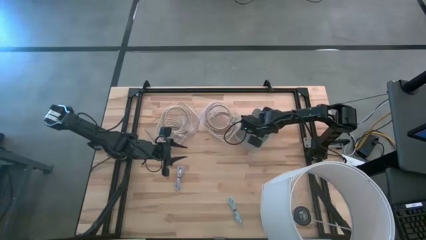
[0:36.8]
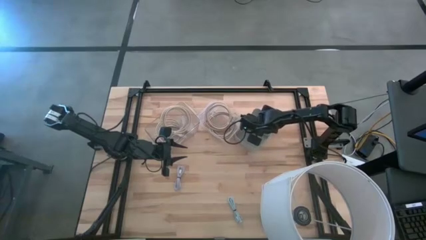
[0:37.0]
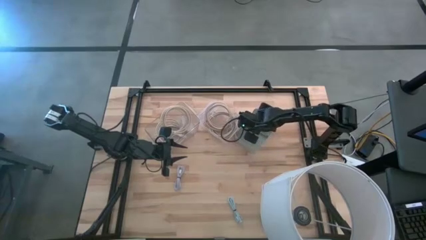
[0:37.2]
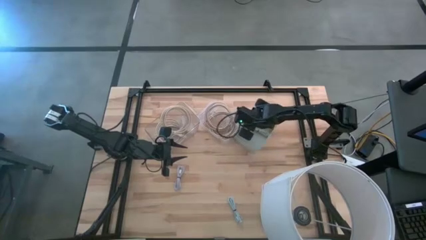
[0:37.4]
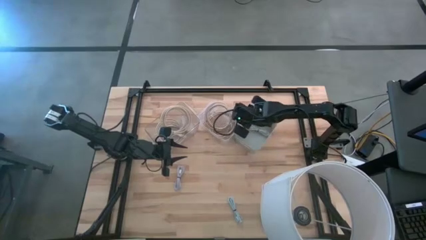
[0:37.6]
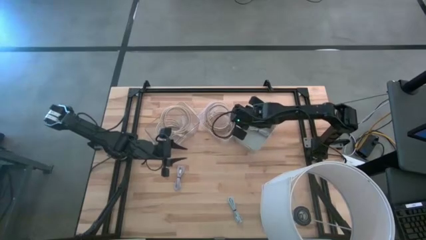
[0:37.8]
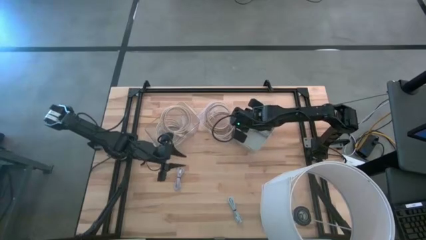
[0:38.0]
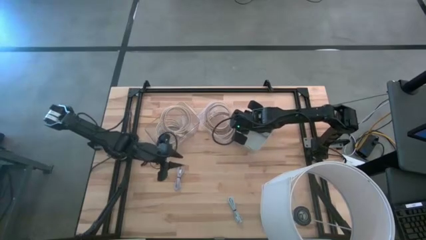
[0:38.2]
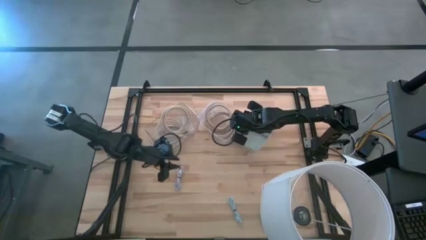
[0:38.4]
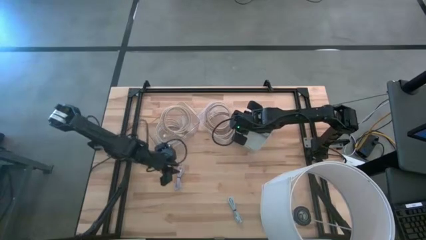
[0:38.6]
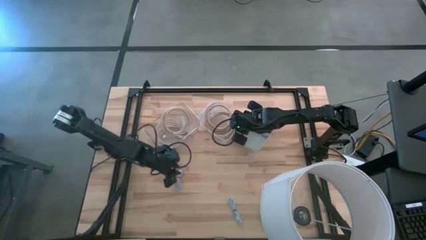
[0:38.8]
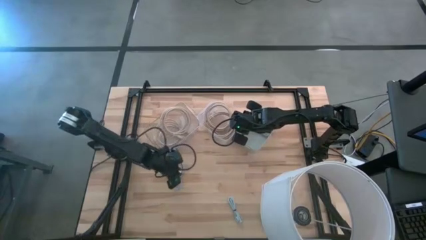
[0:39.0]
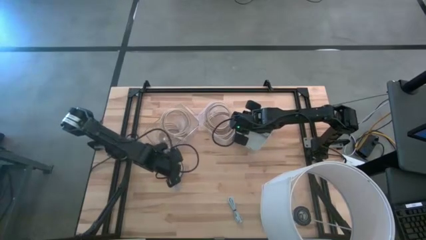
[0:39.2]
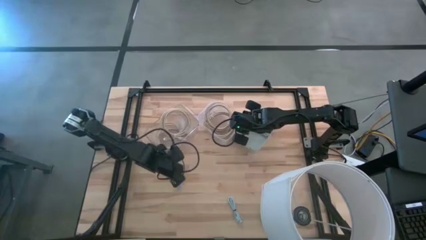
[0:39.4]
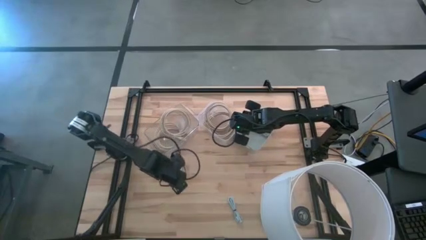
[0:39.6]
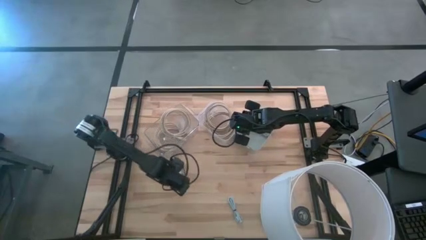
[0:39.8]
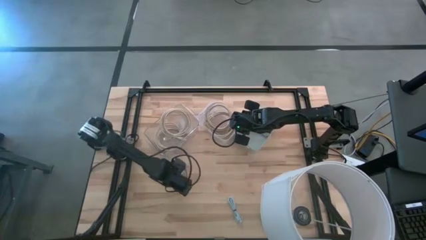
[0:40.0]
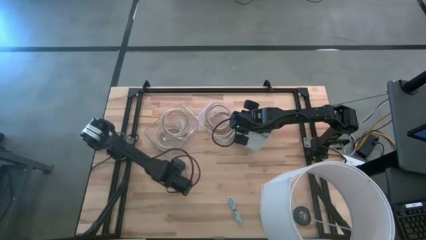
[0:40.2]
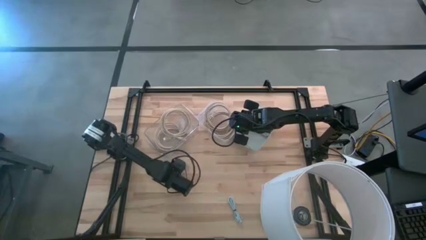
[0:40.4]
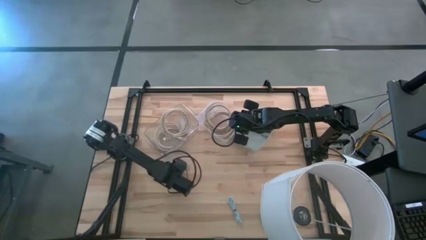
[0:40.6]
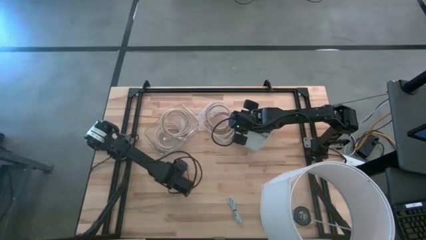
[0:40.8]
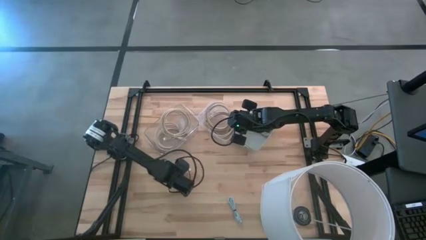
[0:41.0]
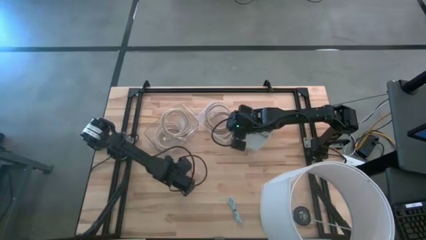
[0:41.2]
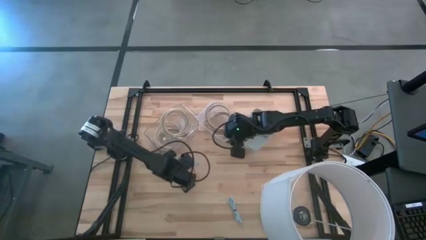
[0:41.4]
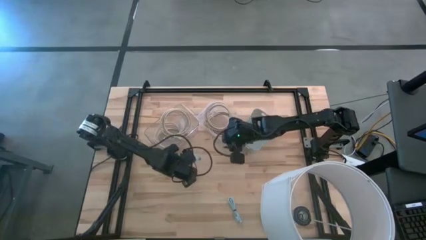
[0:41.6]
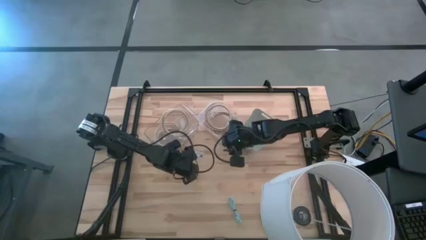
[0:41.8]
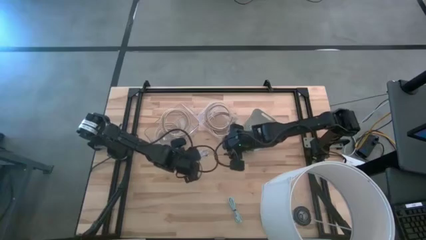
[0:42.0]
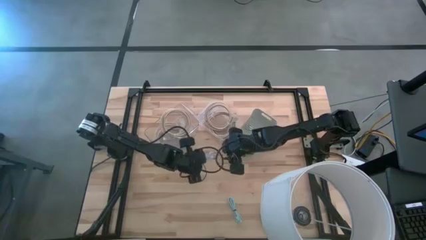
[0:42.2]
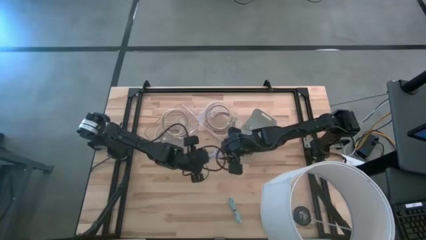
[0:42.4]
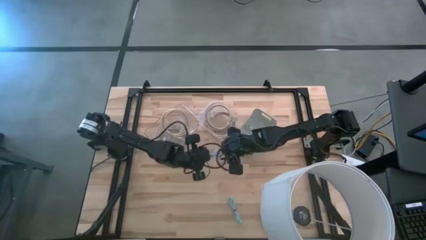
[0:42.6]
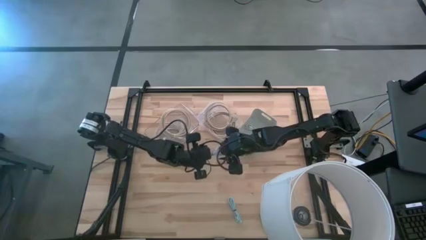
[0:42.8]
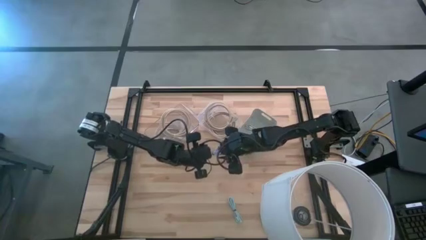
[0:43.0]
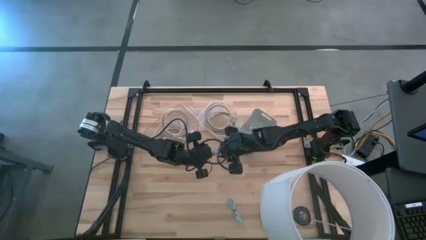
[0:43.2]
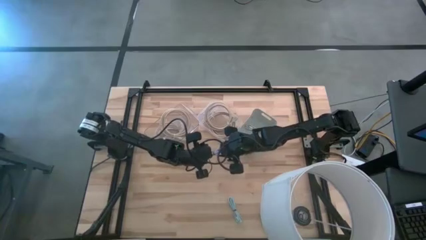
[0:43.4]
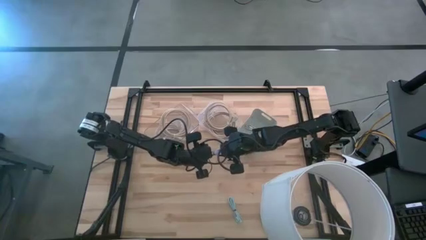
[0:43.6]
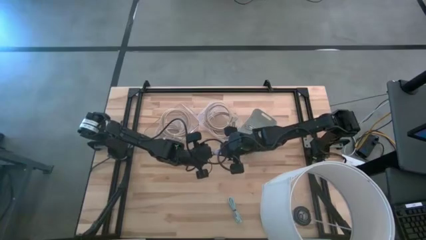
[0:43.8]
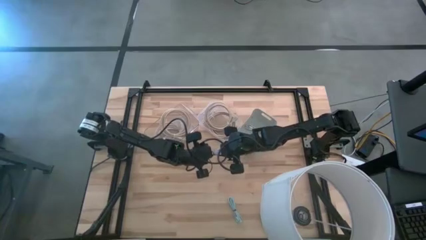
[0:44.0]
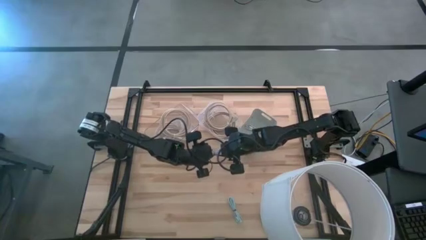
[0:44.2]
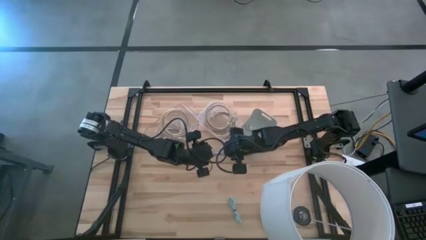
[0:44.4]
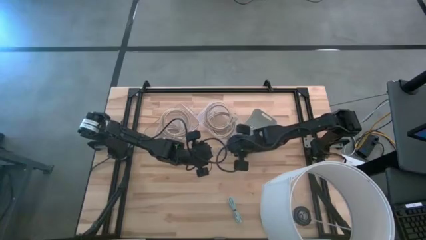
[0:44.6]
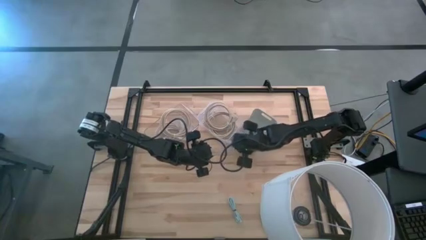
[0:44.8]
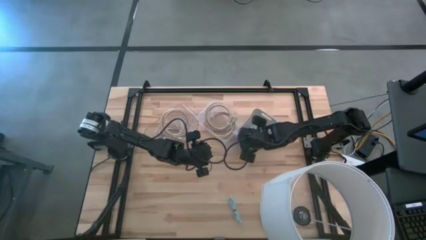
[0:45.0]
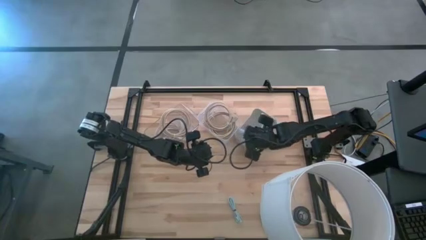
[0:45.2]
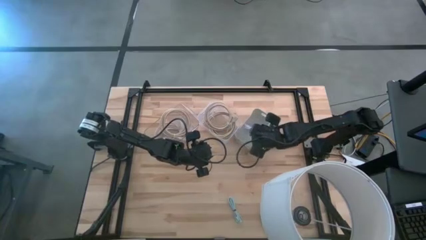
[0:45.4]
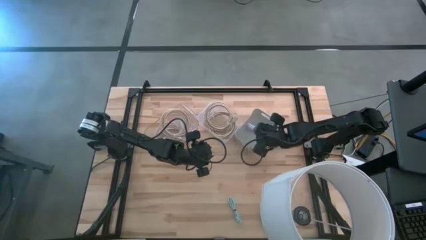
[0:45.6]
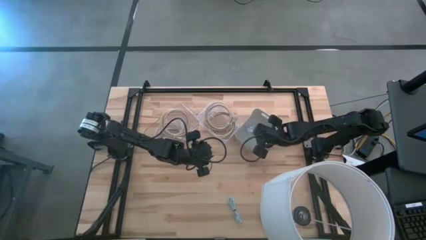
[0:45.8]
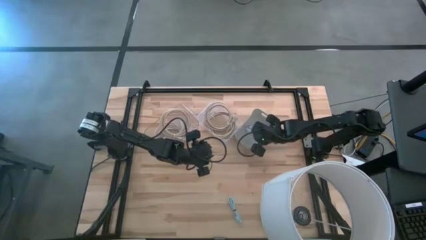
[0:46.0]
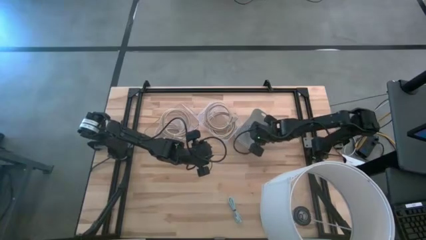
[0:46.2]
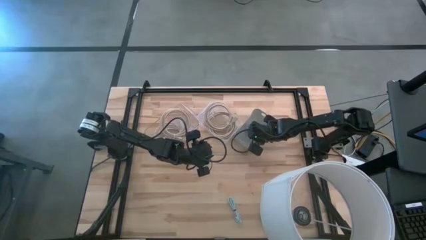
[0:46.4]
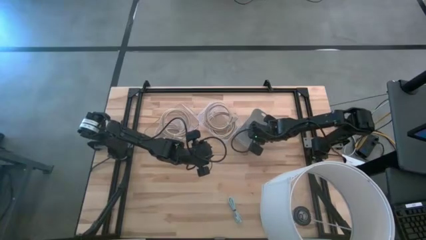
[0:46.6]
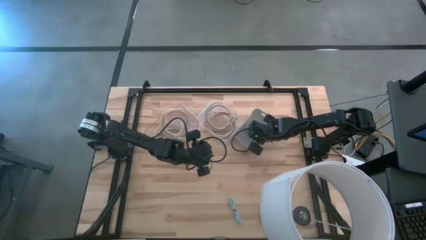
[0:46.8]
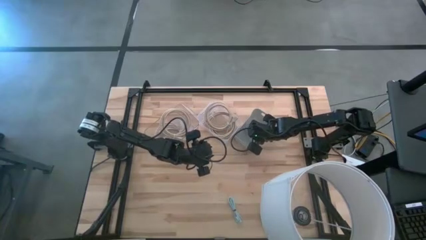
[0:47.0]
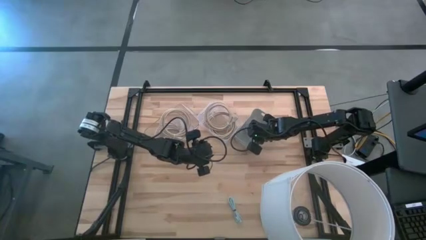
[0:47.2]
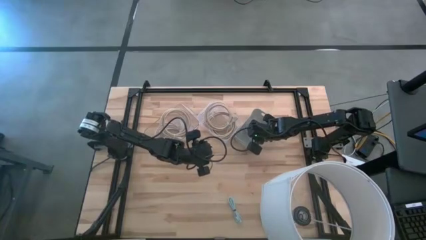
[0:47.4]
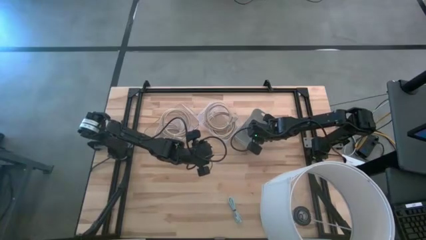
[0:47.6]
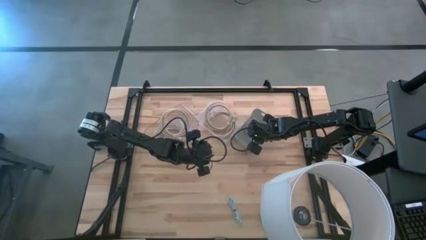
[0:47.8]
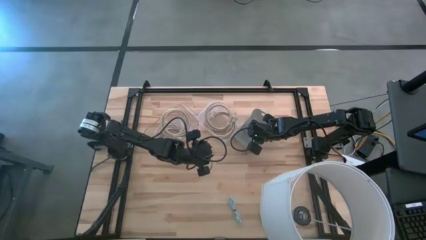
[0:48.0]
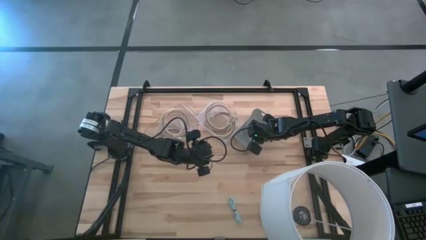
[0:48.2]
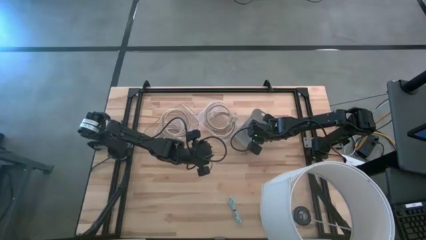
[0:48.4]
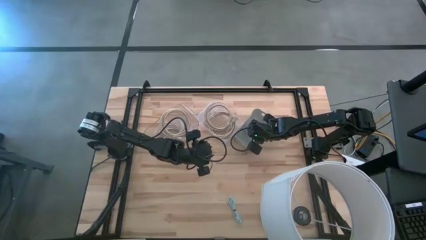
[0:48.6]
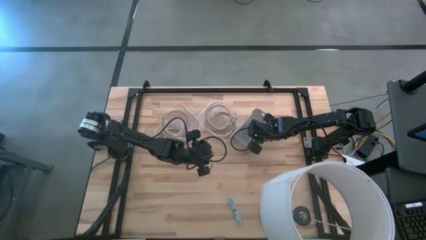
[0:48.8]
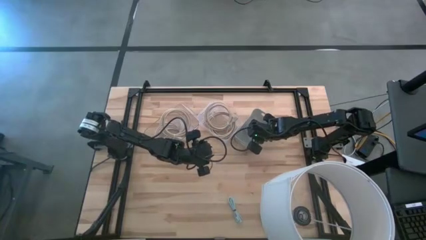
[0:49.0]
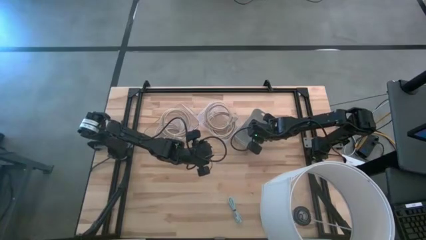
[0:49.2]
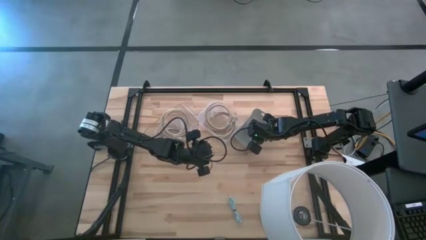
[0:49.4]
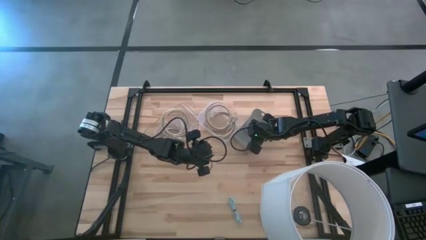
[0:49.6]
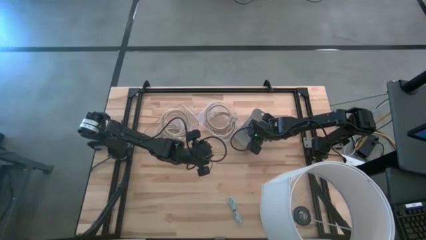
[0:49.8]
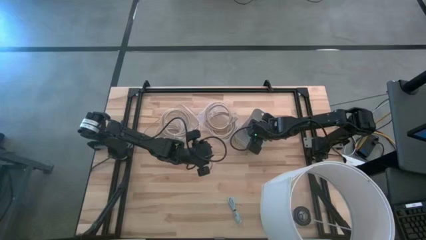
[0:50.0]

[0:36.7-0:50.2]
Task: Pick & Place USB Port
Put the purple charger cable into the white bin
